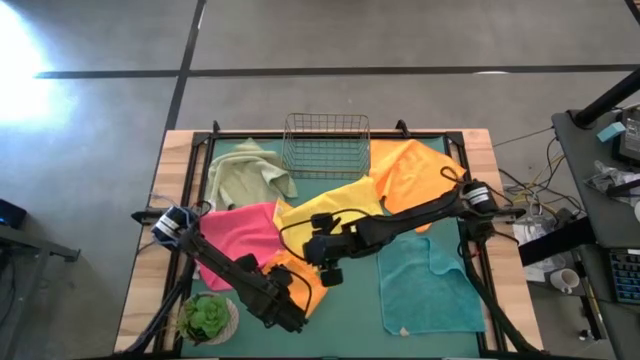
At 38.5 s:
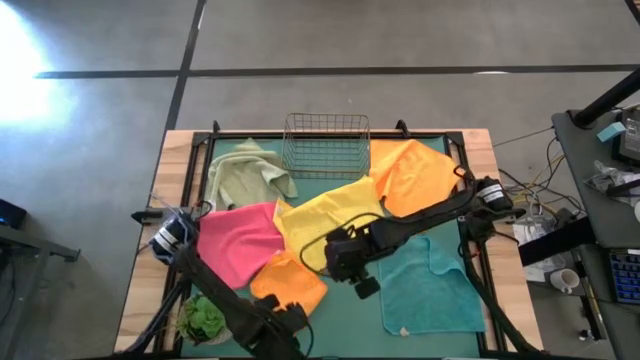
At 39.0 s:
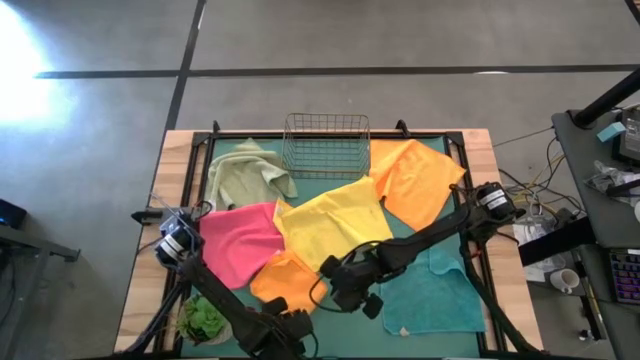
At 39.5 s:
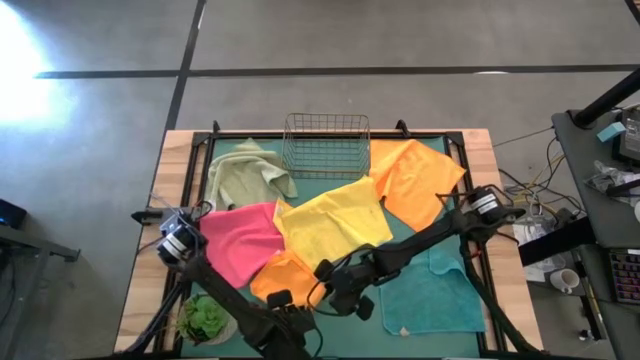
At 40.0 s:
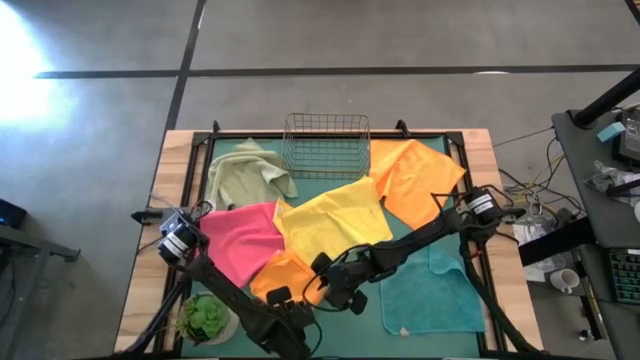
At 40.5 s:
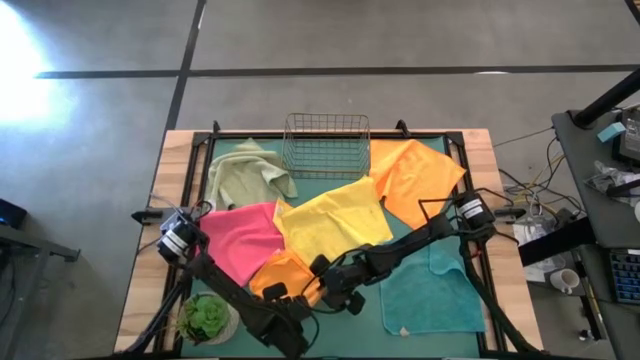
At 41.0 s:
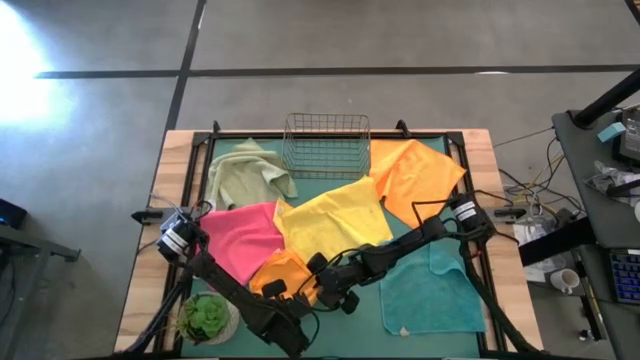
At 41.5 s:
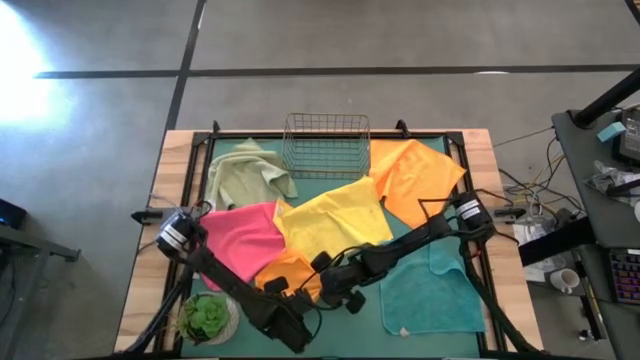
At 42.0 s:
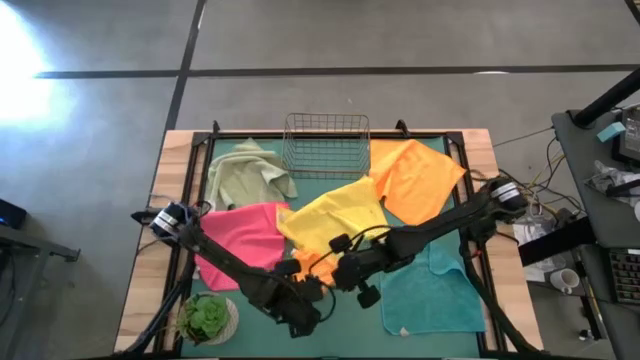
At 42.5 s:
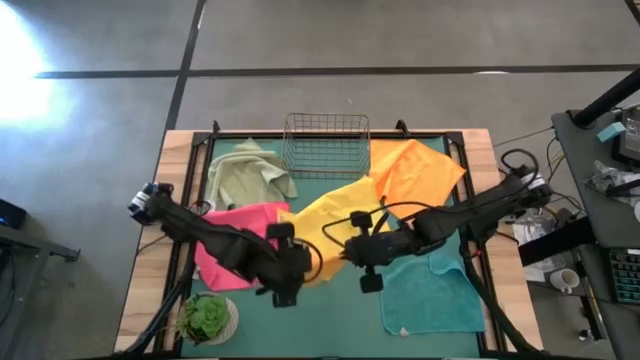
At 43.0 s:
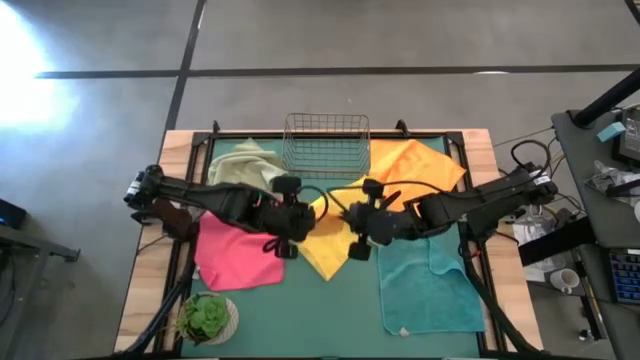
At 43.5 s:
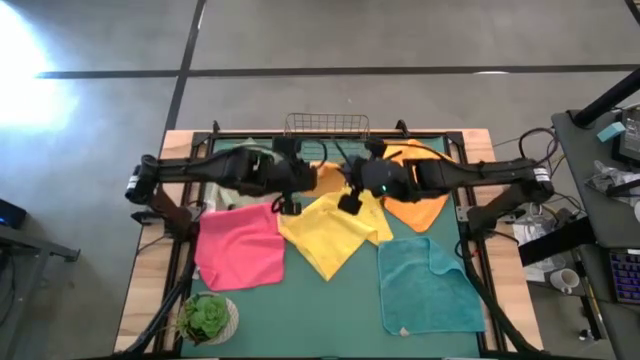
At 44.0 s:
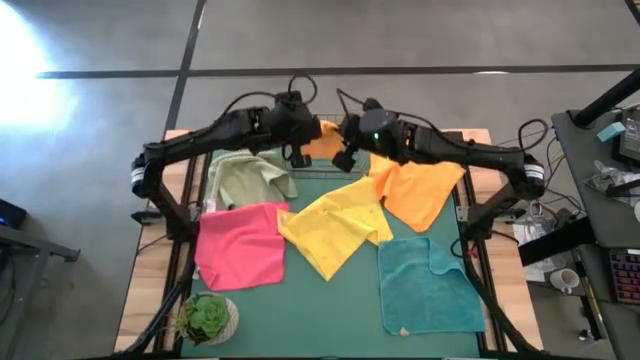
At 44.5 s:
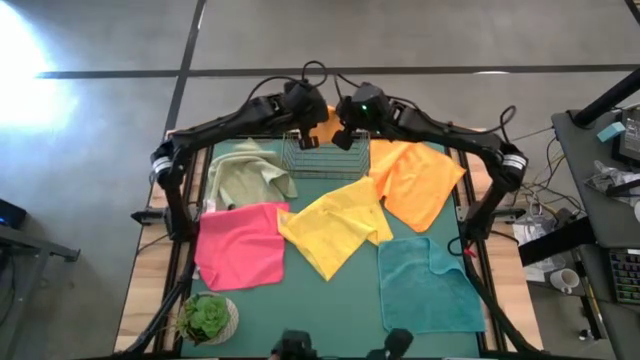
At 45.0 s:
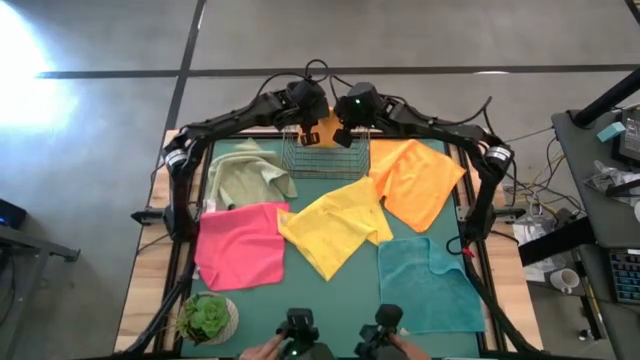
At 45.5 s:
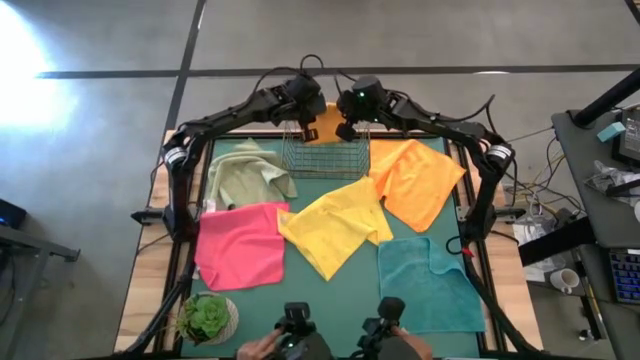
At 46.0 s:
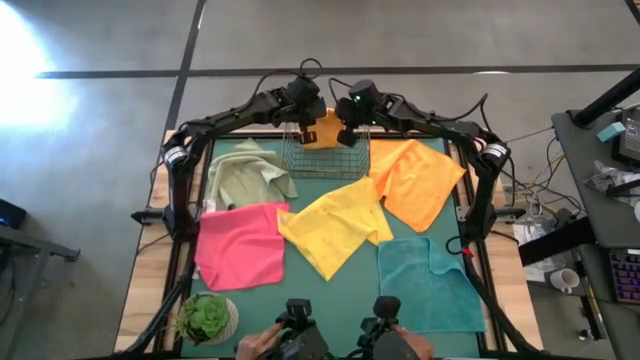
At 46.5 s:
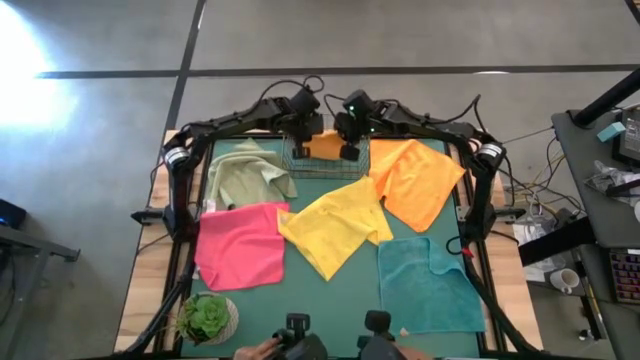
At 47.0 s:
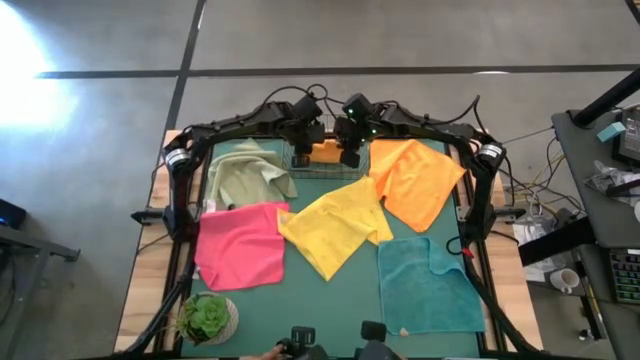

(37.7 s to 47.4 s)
Task: Fold microfiber towels
Put the bottom orange microfiber towel into the wire basket

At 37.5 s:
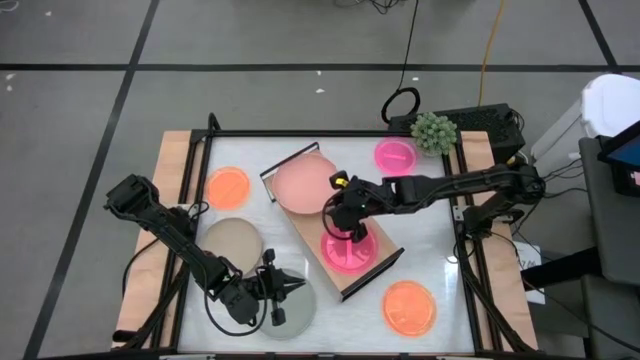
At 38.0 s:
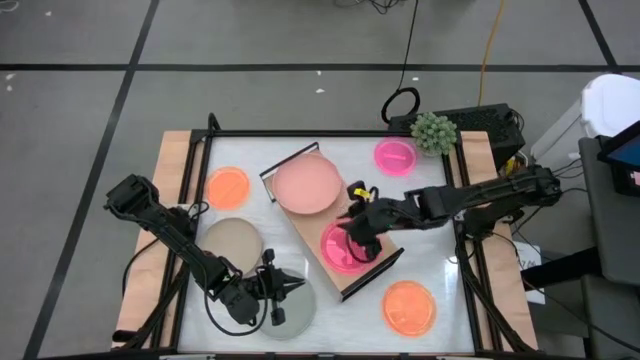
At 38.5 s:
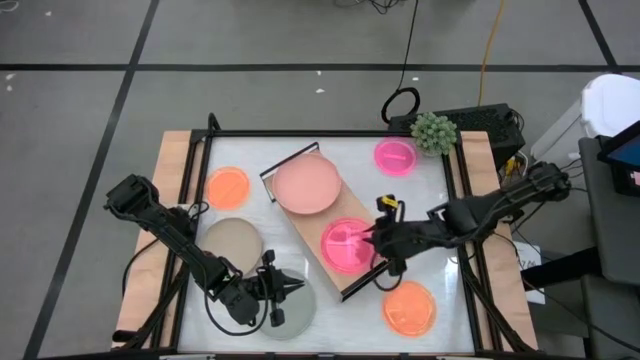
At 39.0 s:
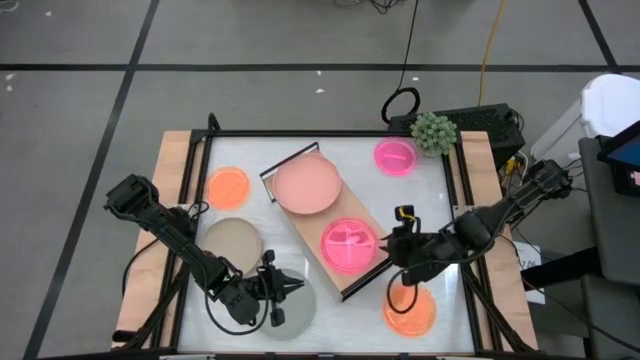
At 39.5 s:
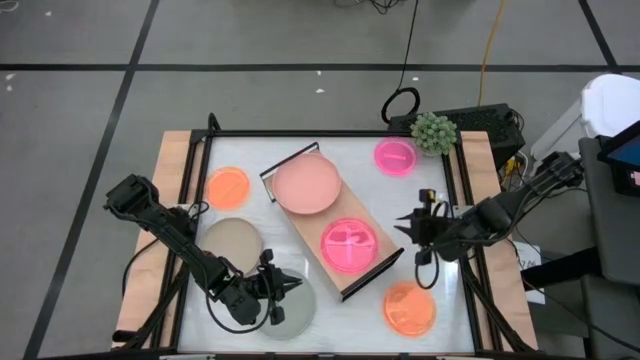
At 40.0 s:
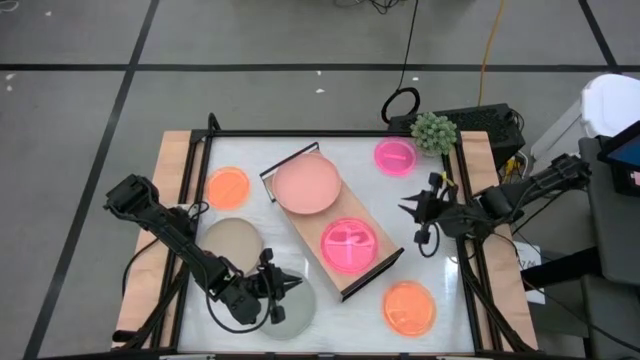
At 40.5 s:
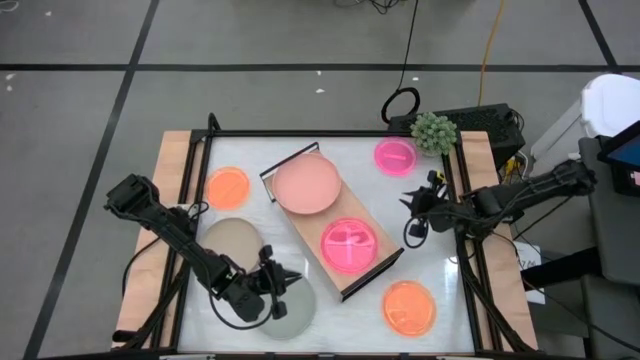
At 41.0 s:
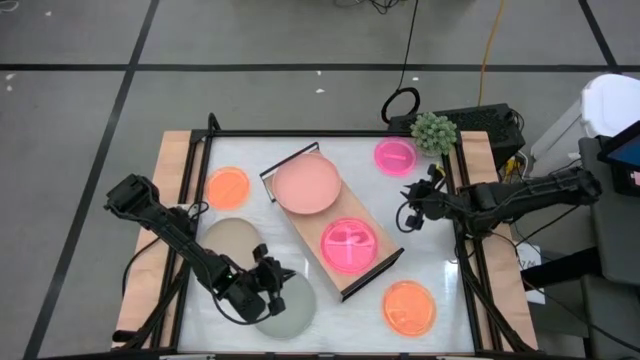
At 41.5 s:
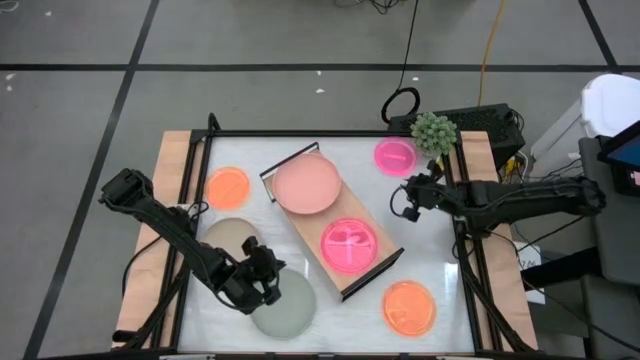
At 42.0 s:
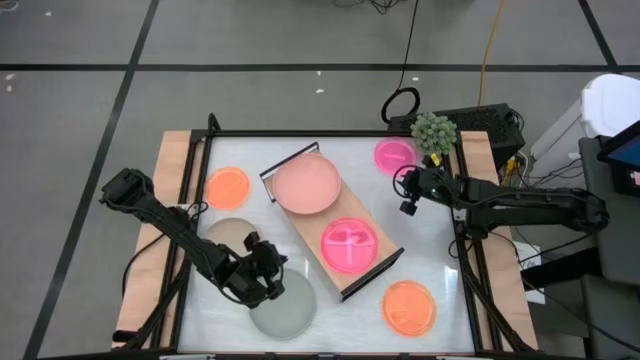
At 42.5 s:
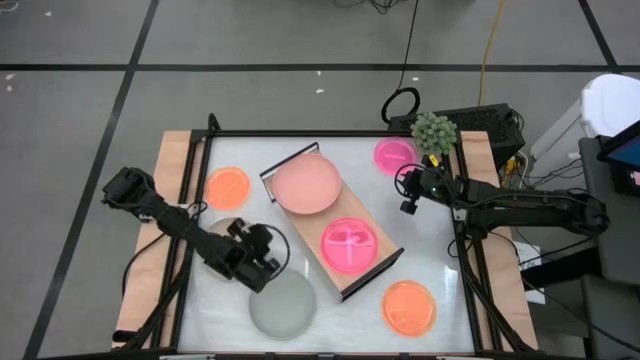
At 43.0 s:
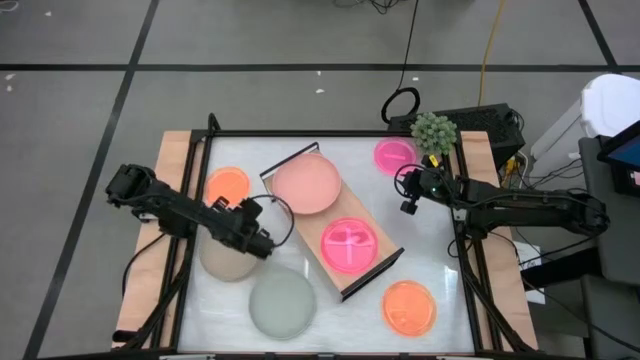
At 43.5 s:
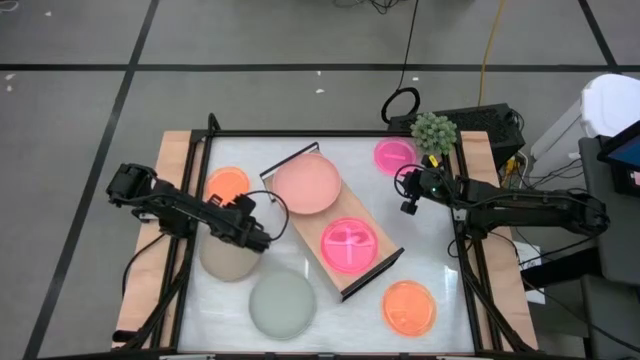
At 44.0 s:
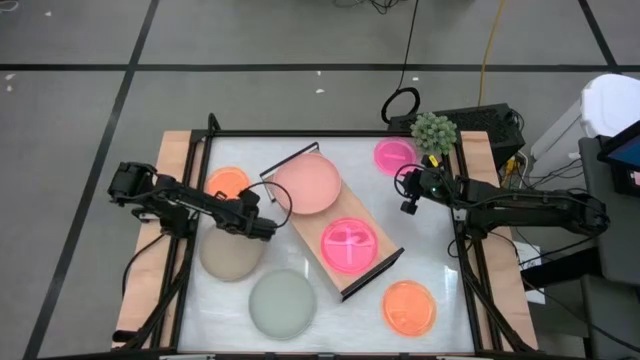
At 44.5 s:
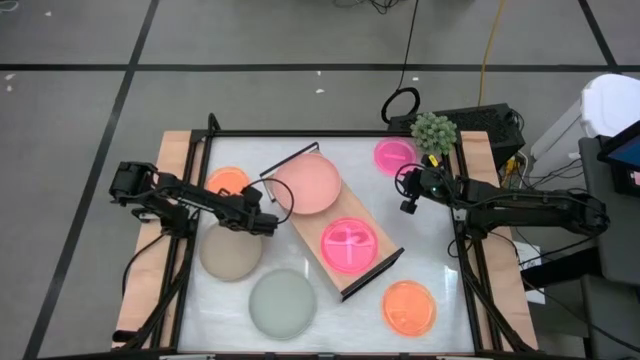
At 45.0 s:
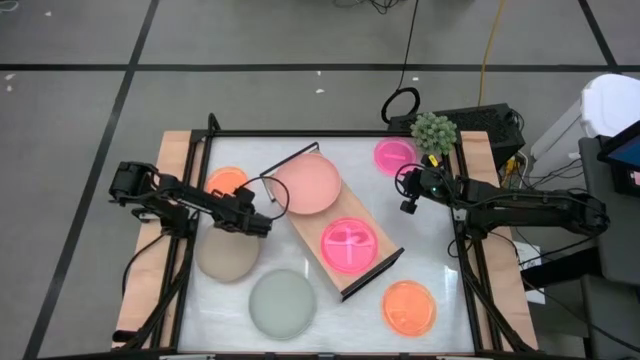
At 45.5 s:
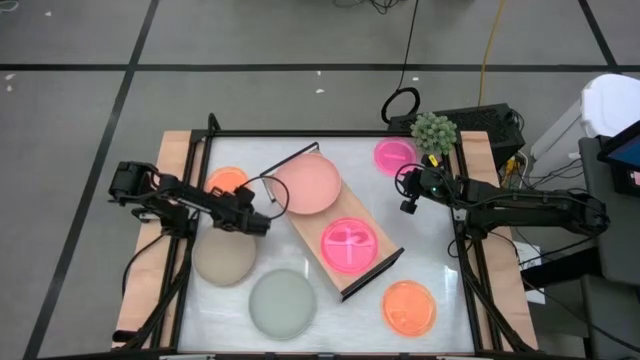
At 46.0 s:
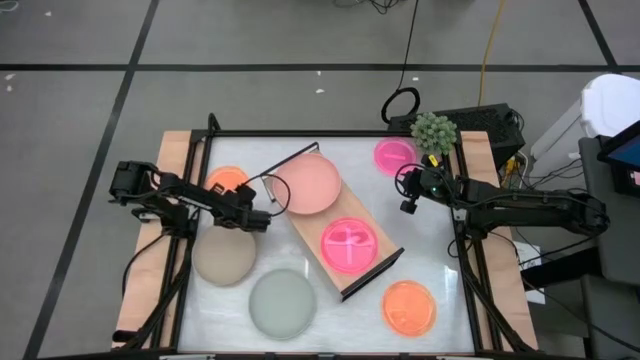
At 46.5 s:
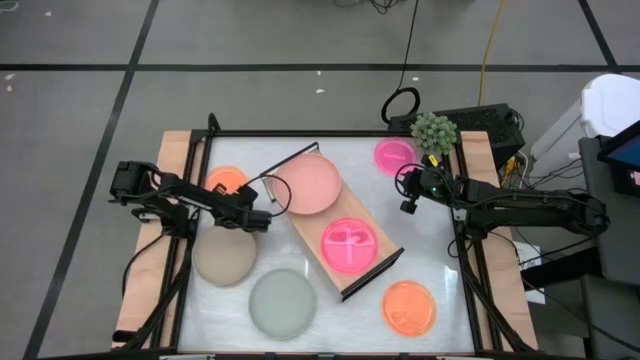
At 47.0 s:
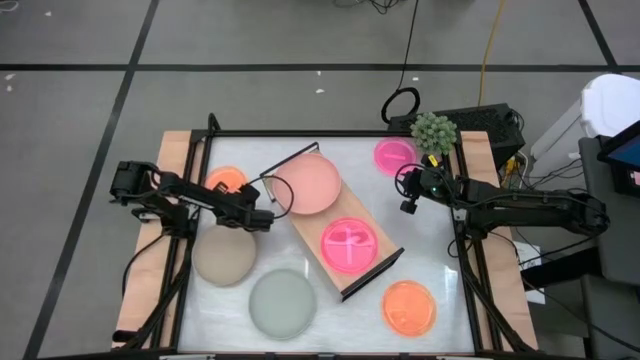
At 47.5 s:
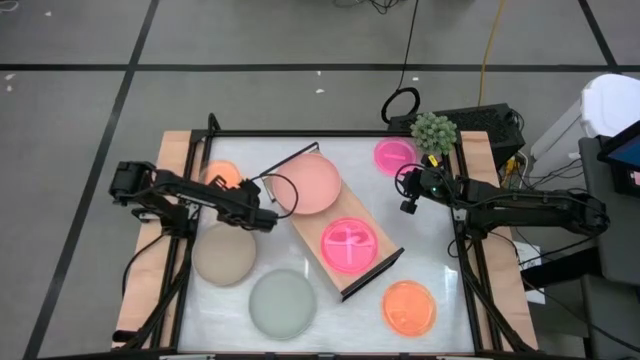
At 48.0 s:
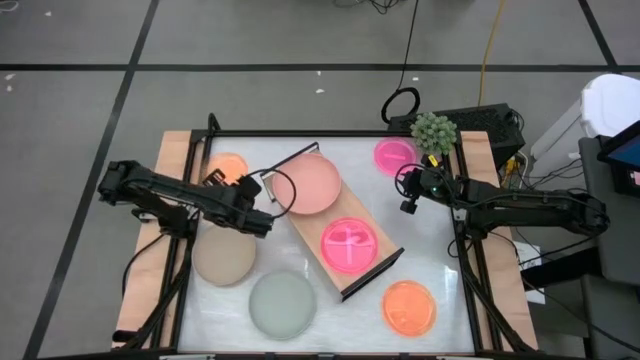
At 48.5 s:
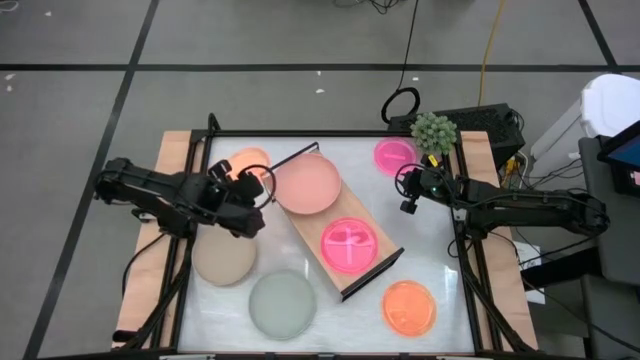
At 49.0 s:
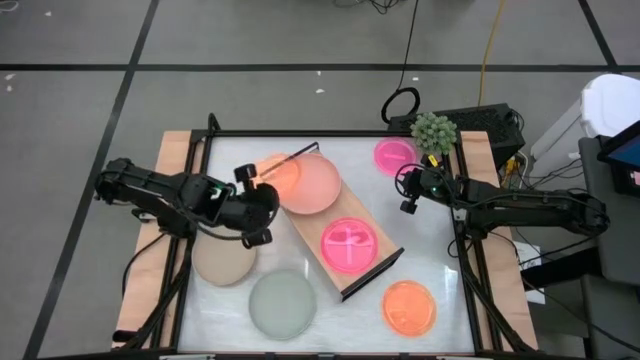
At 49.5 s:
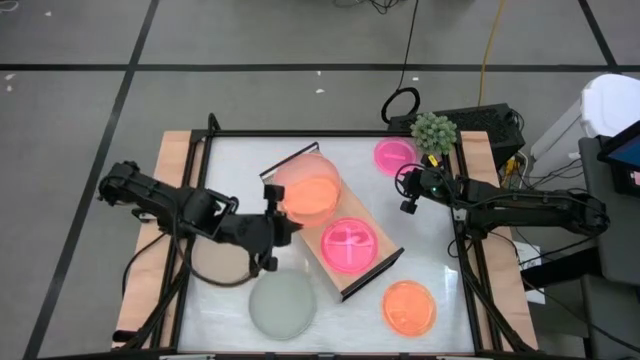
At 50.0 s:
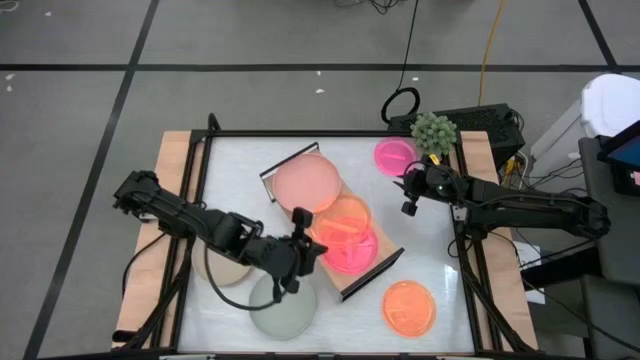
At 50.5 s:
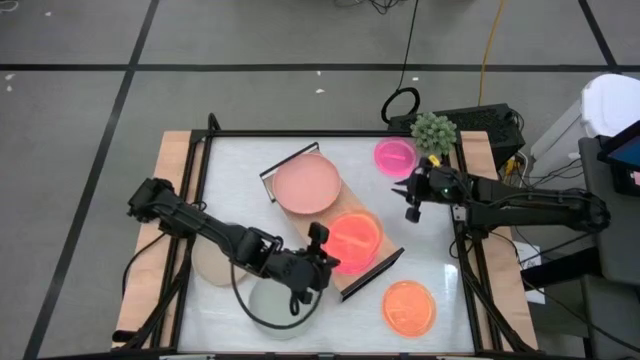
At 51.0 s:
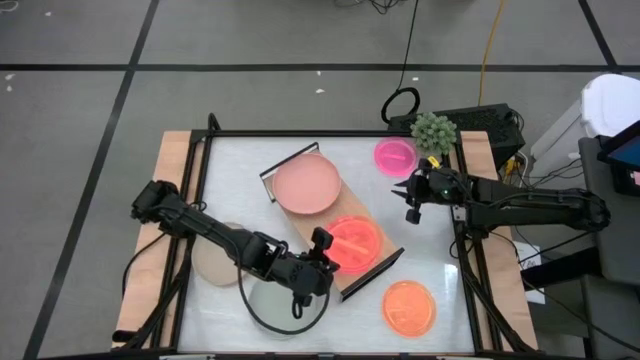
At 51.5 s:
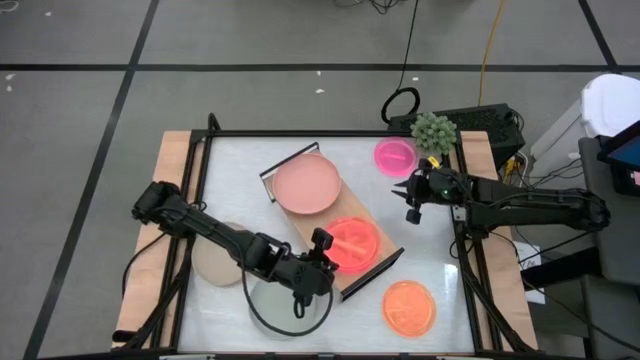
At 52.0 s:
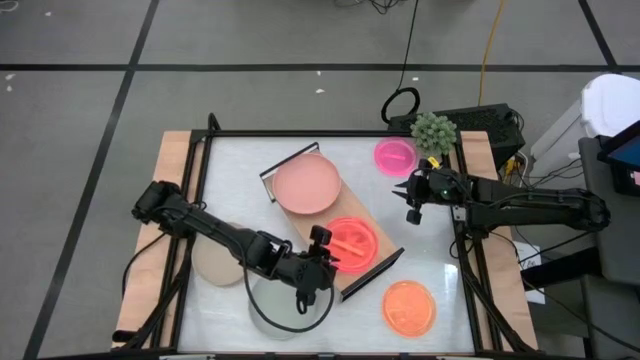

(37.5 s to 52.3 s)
Task: Place and stack plates onto a shelf
Stack the top small orange plate on top of the small pink plate on the shelf
